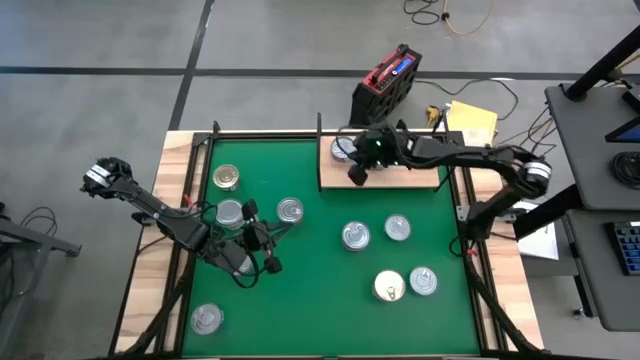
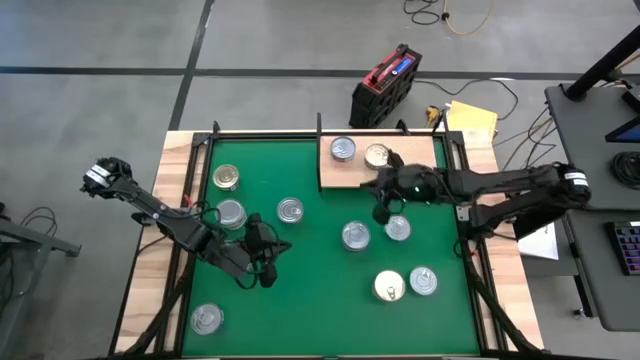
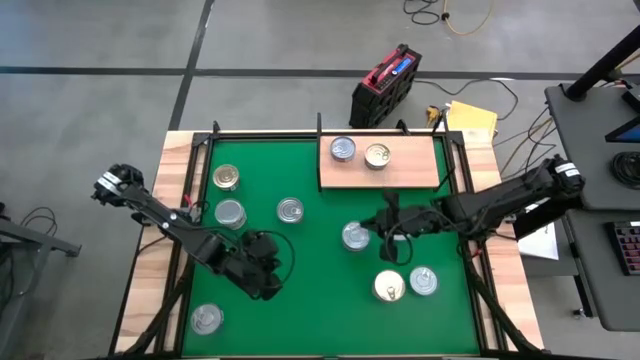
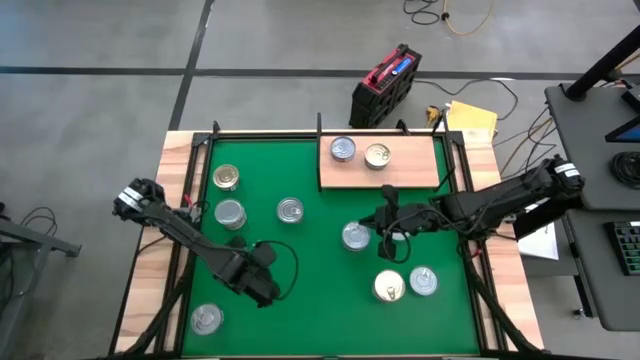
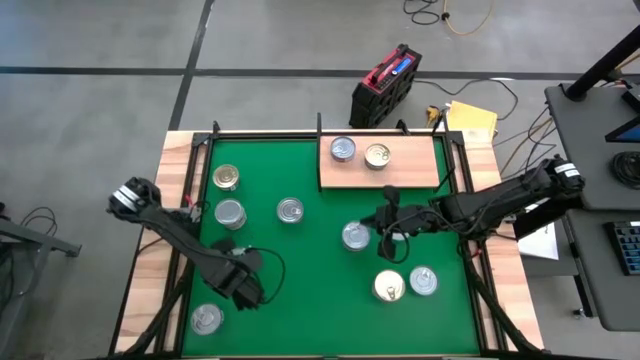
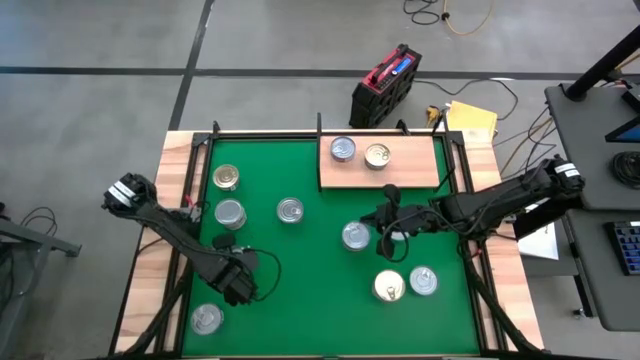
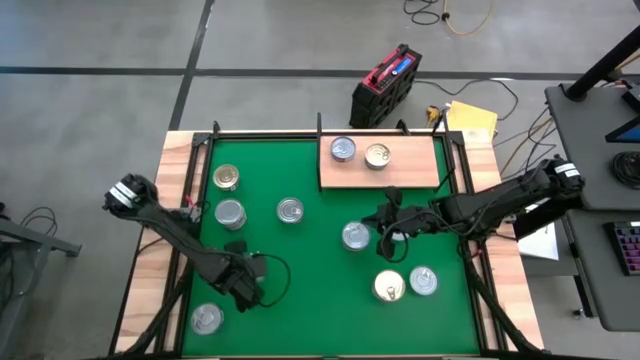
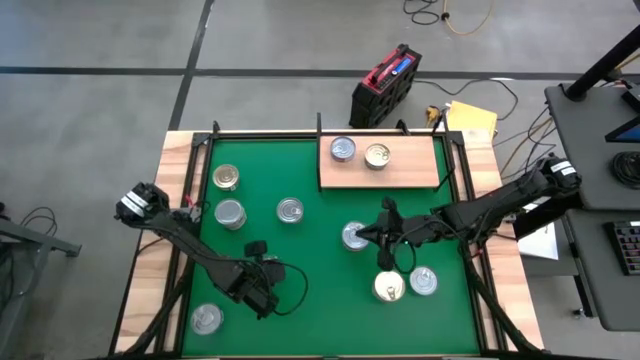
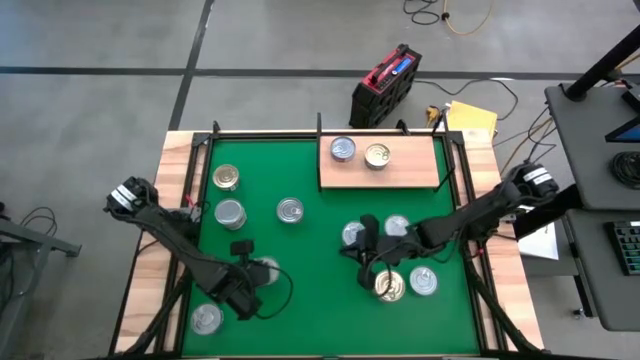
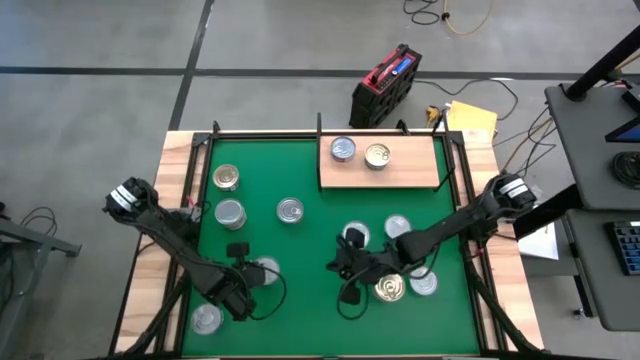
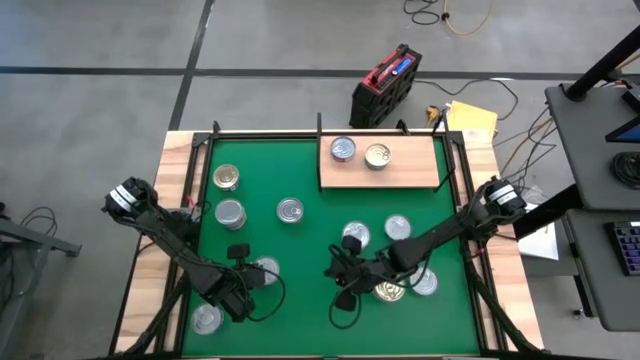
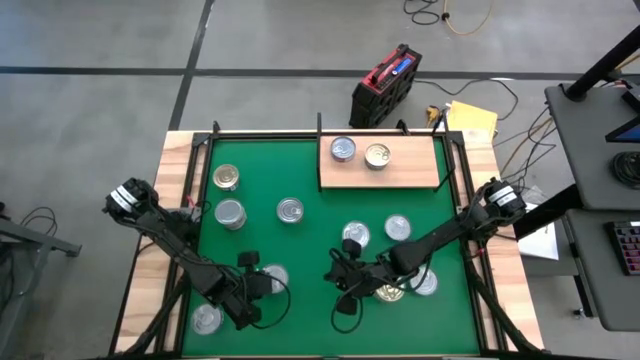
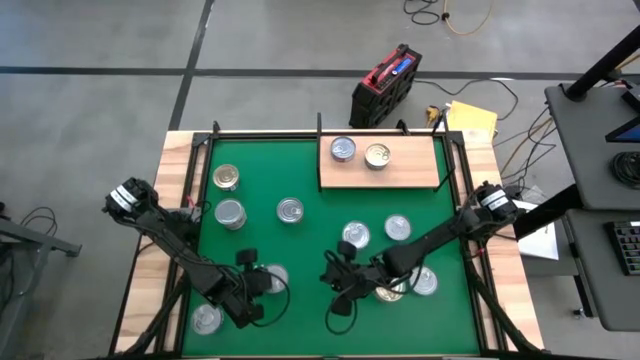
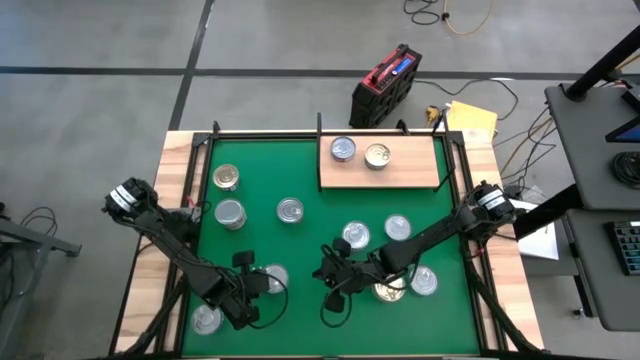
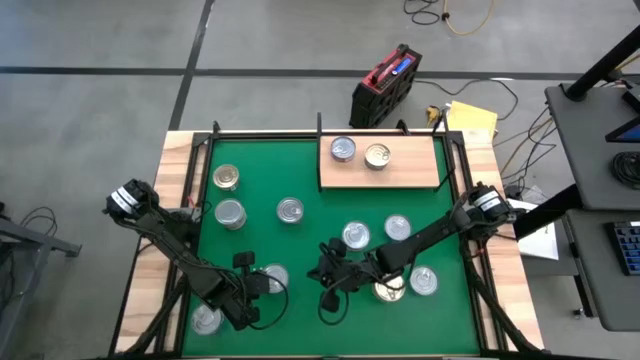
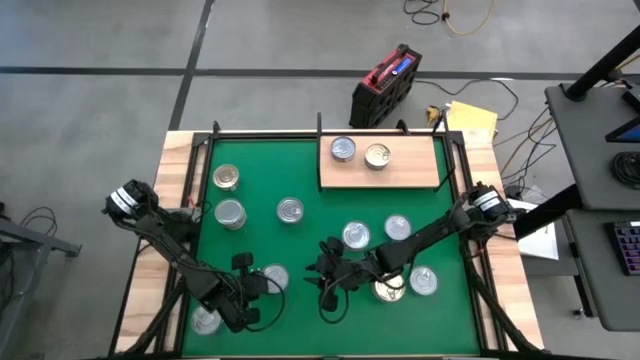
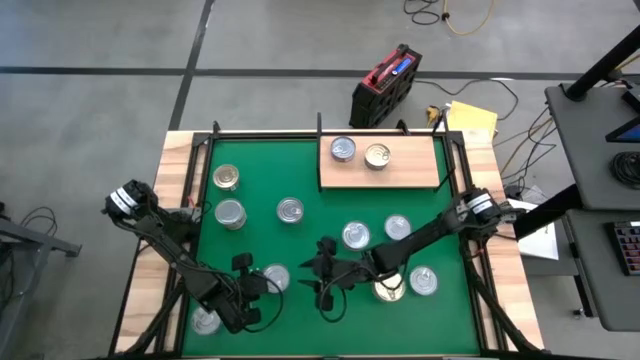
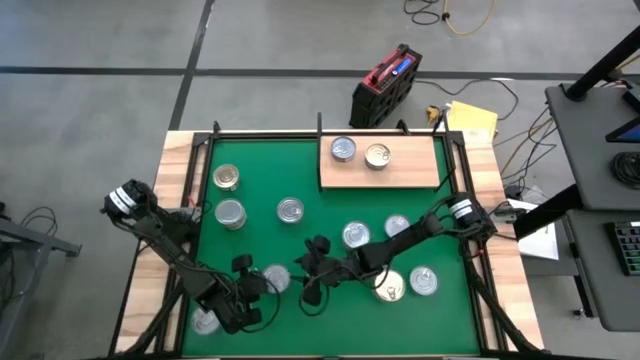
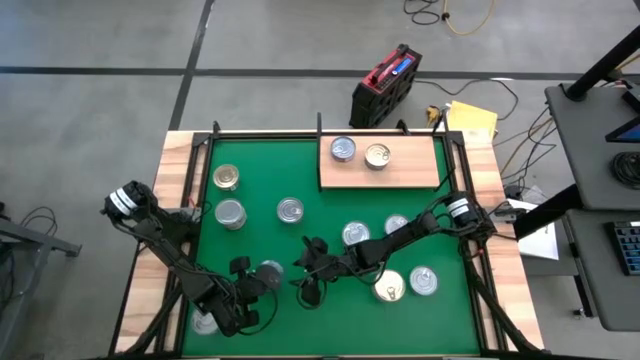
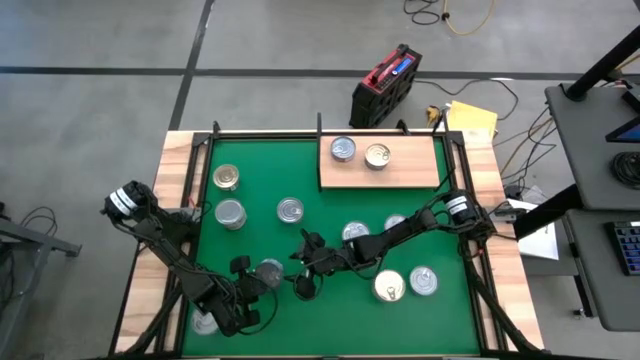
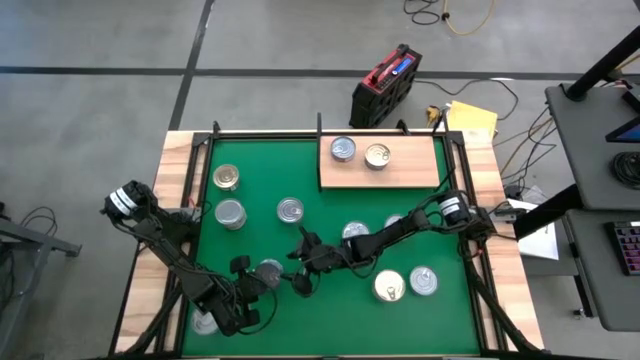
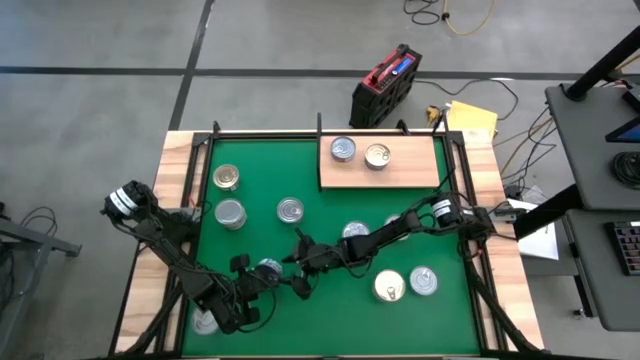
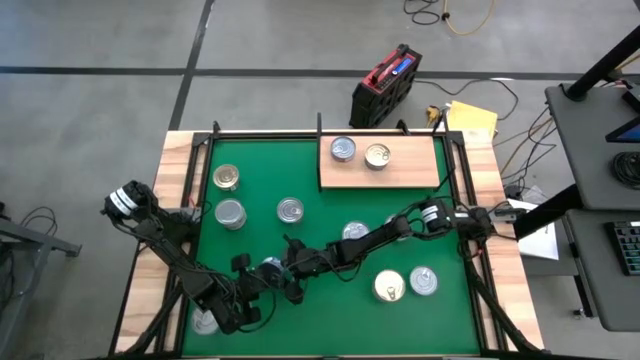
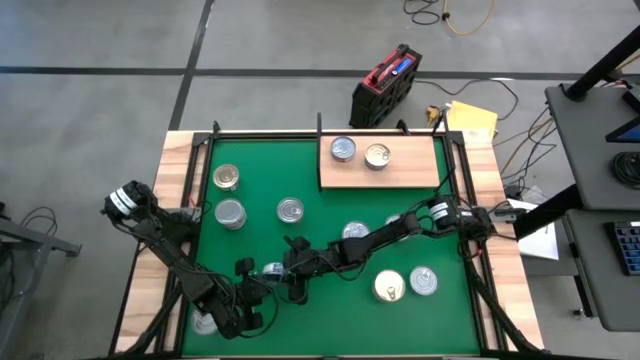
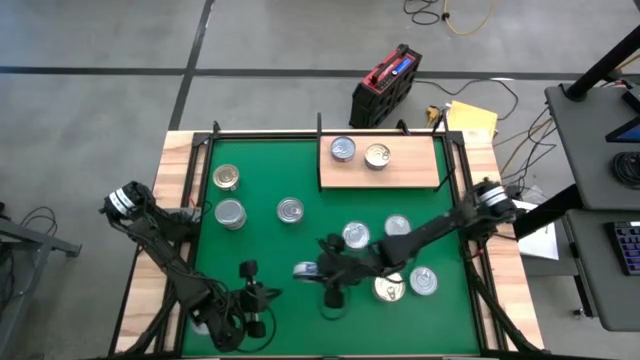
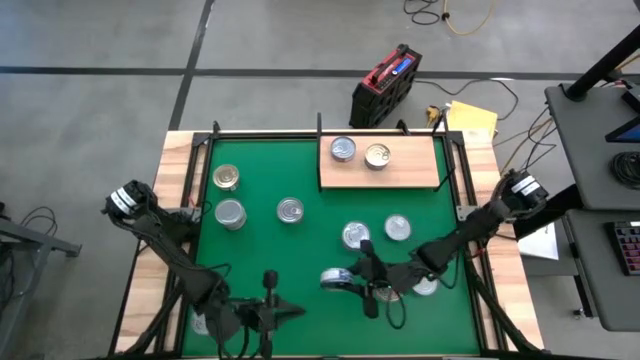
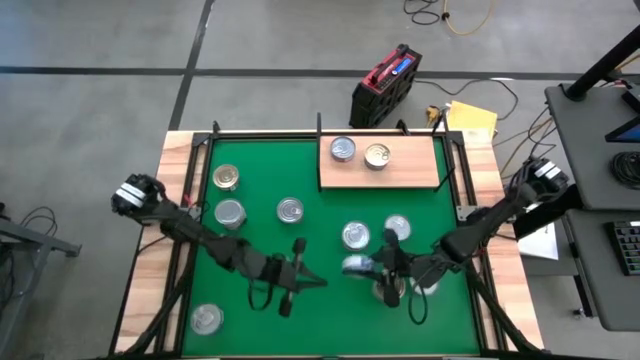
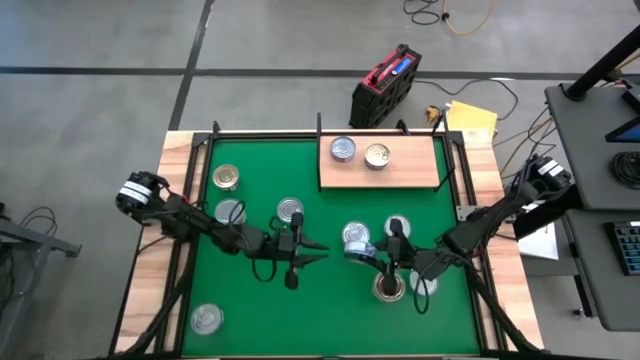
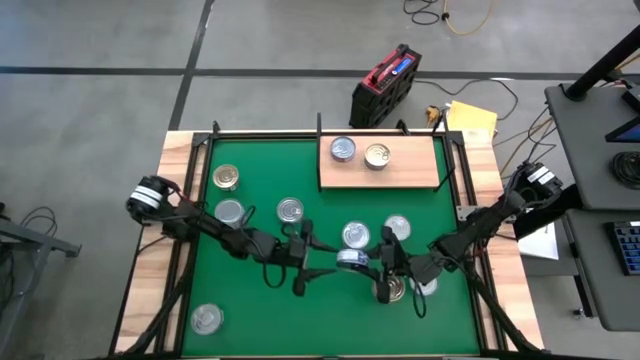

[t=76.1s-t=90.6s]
Task: Stack canned seafood by type on shelf
Put the blue tuna can on the shelf

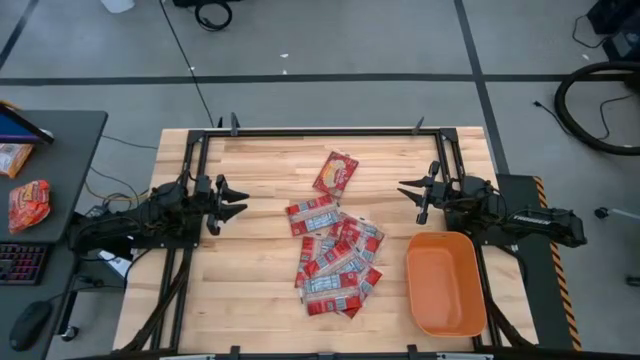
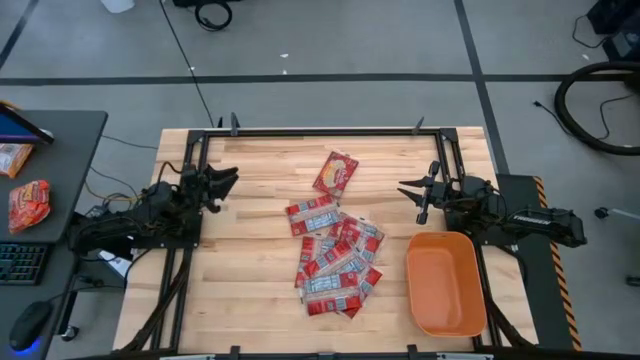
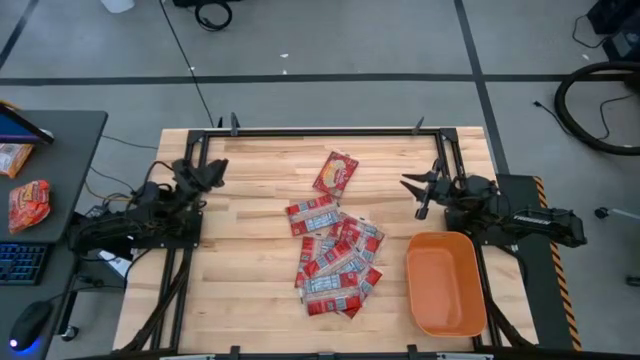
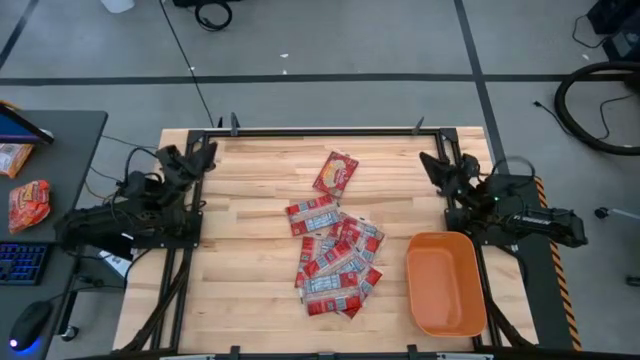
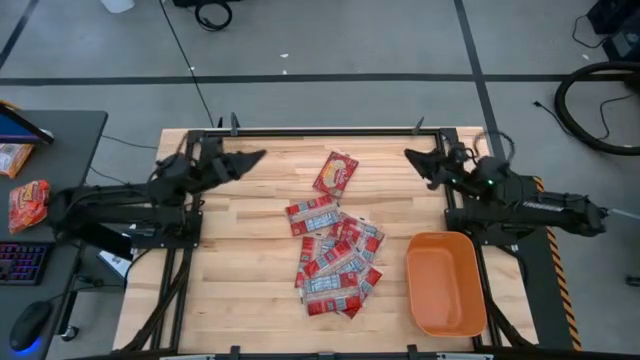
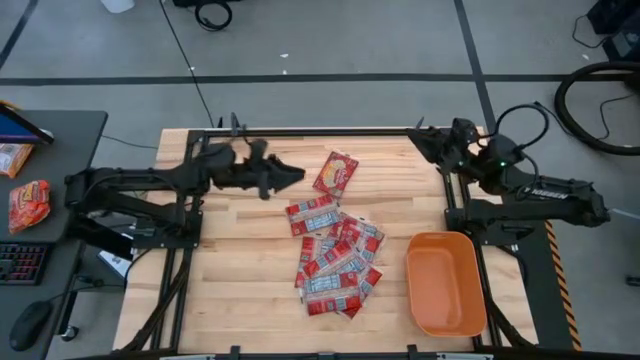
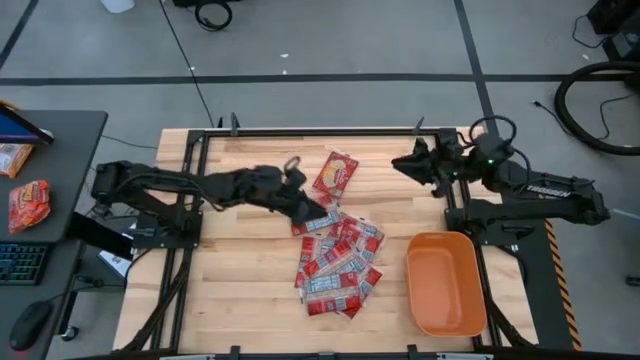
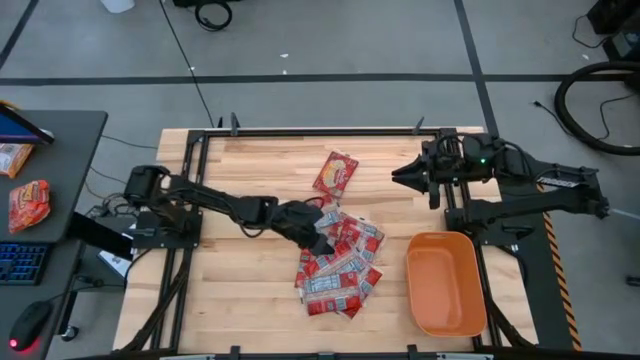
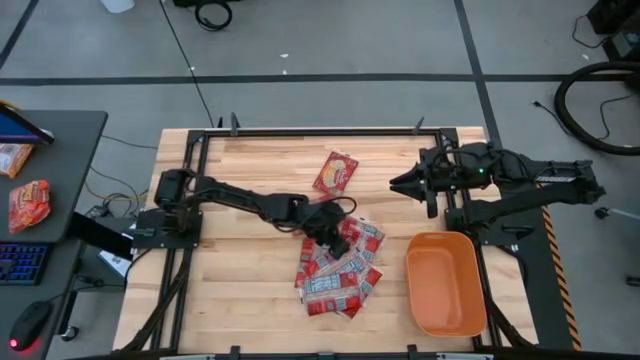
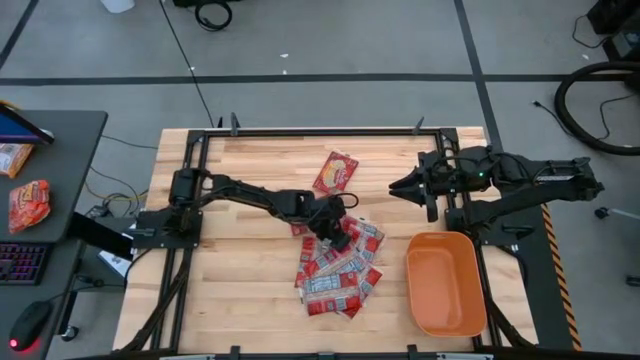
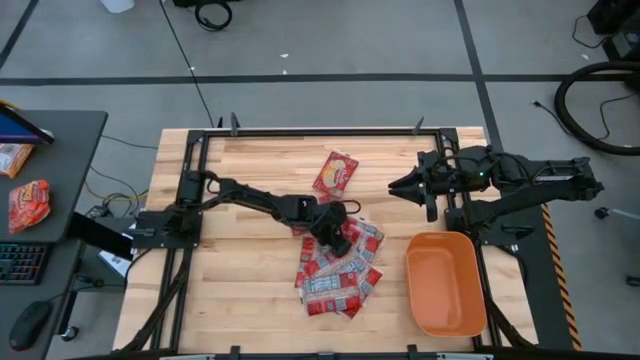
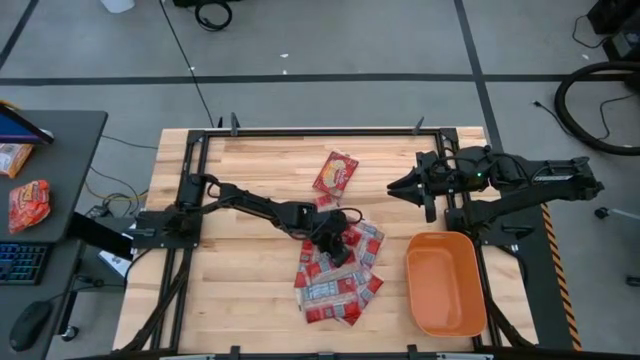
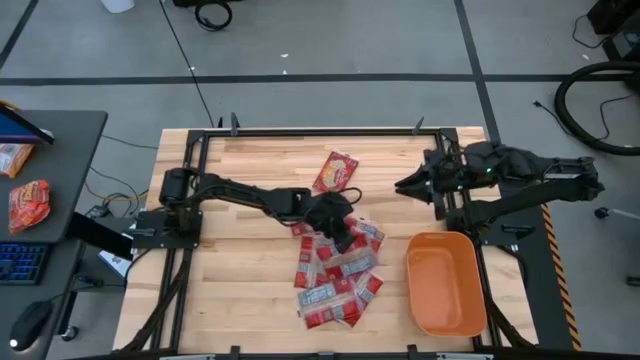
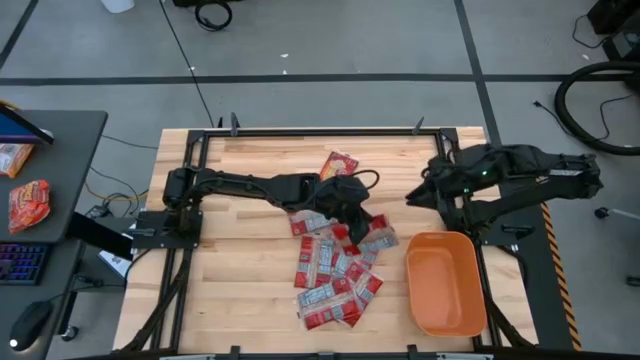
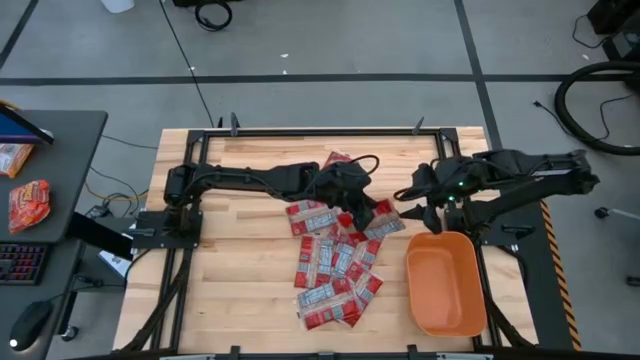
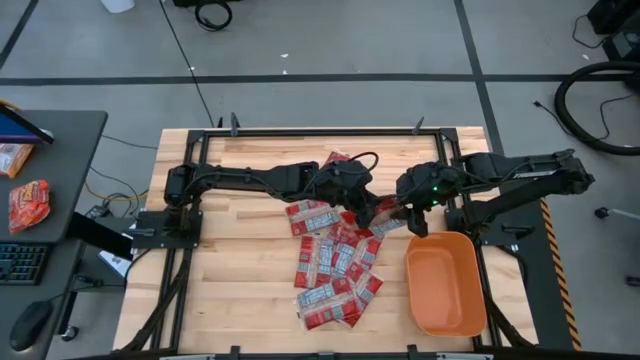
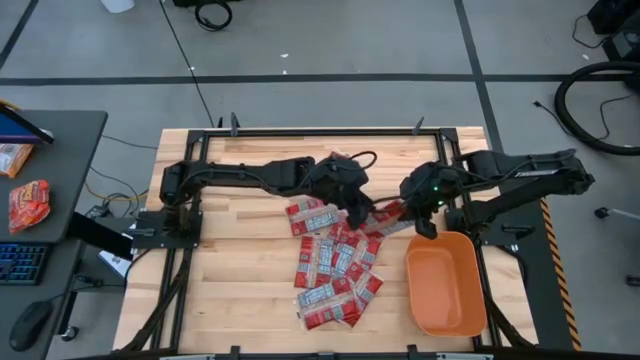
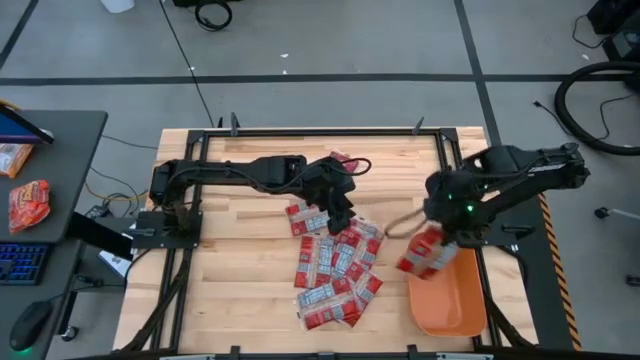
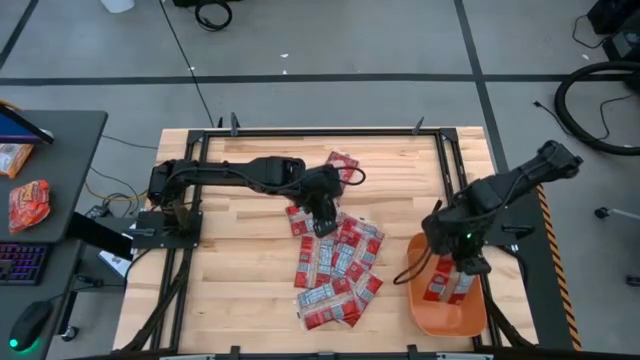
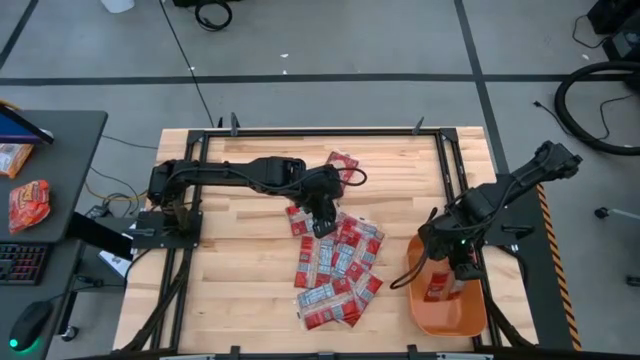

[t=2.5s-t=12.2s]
Task: Sort popcorn bags into baskets
Put the red popcorn bag into the orange bin
